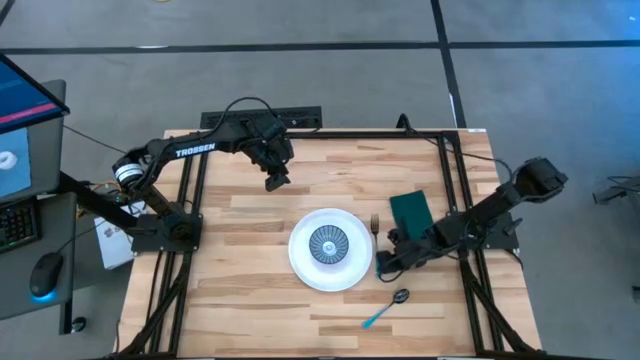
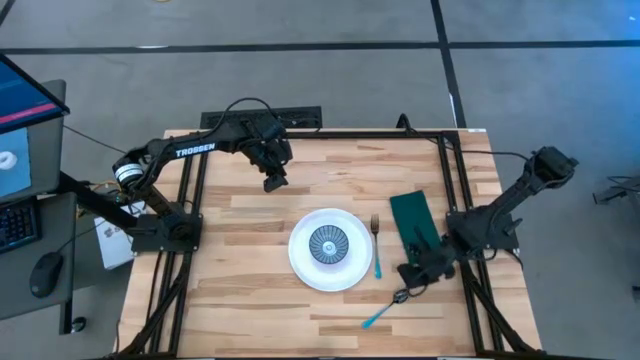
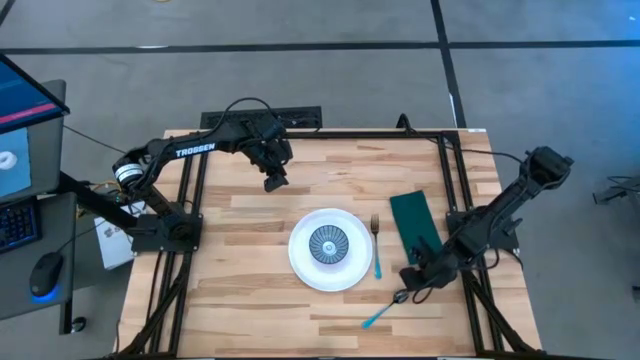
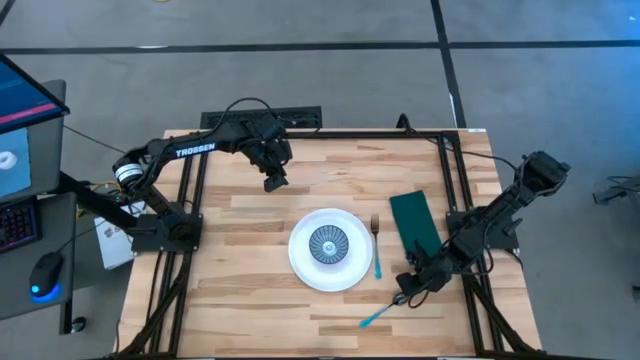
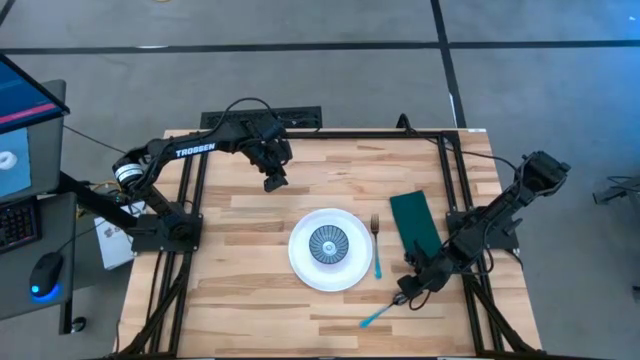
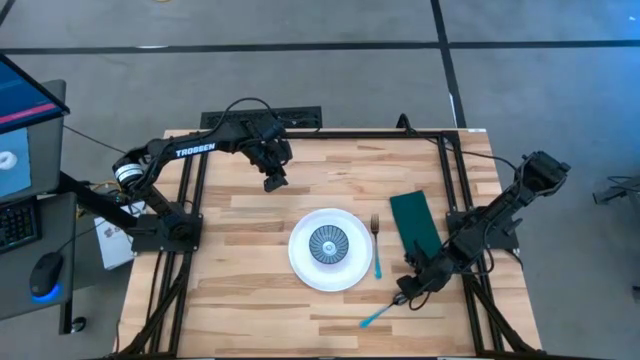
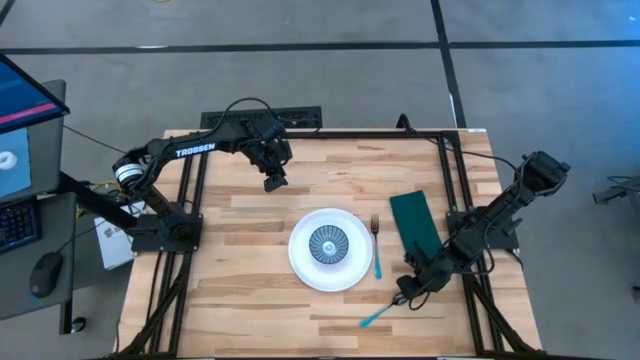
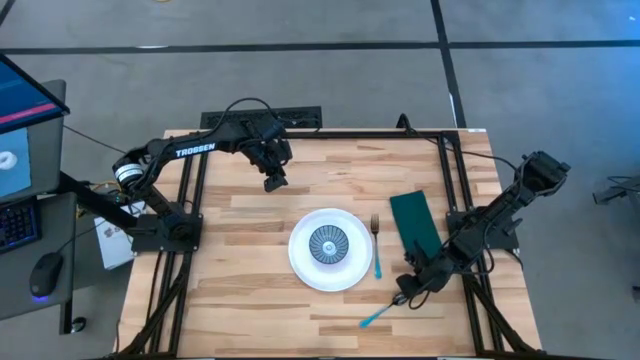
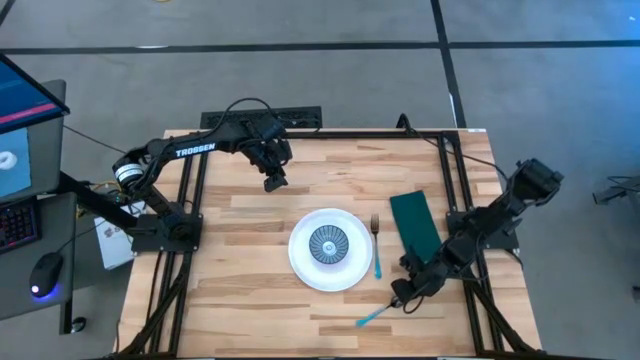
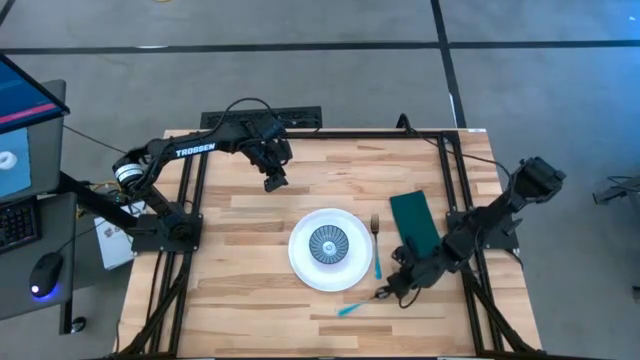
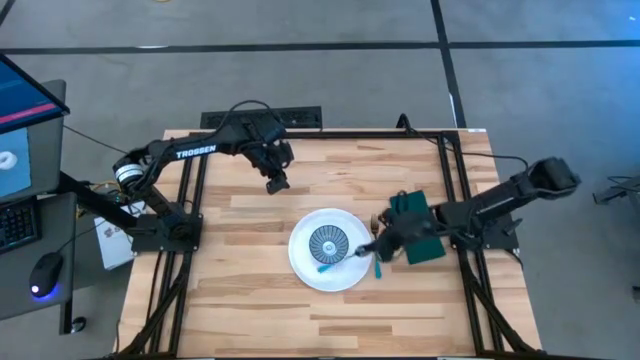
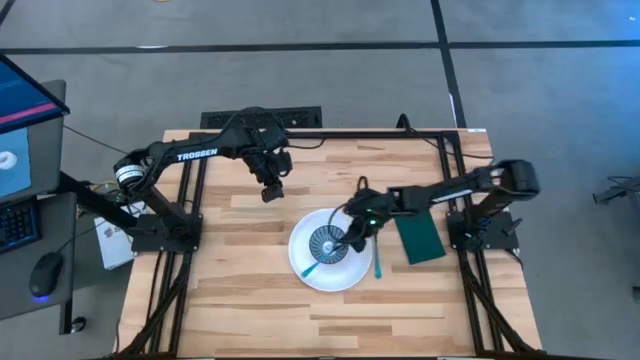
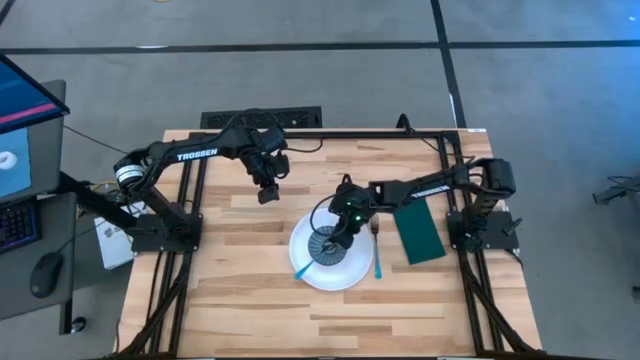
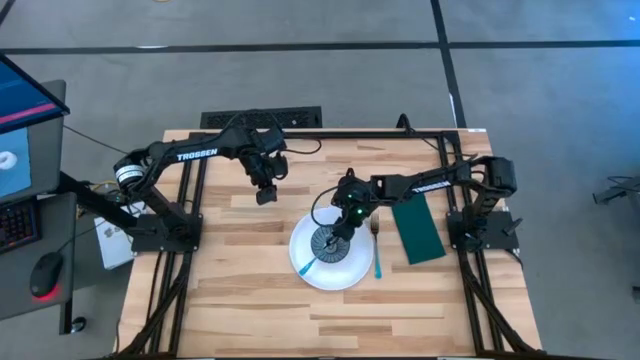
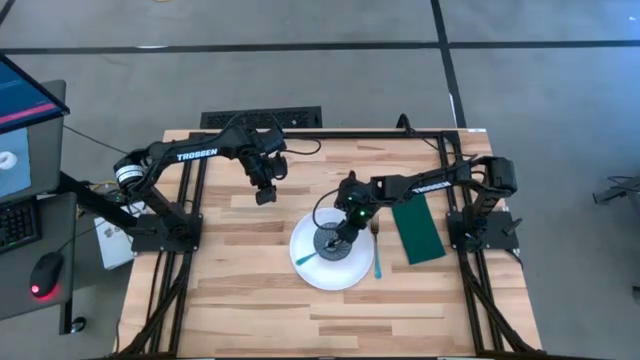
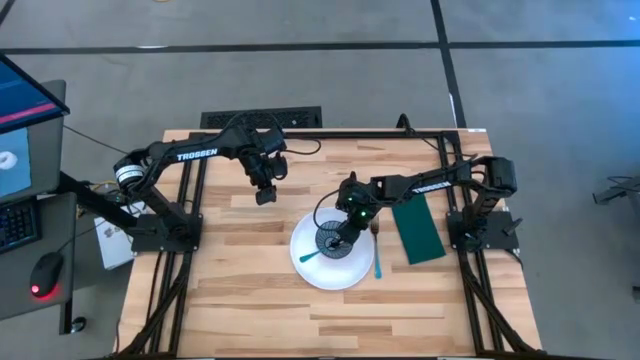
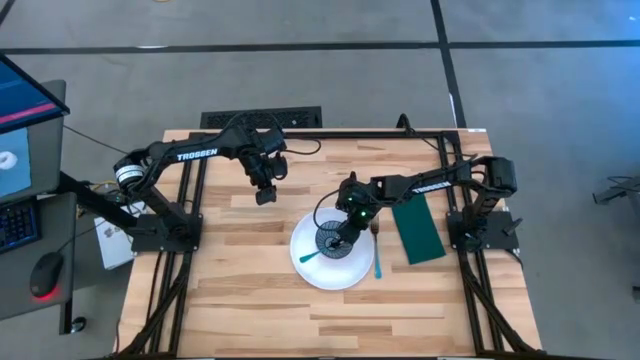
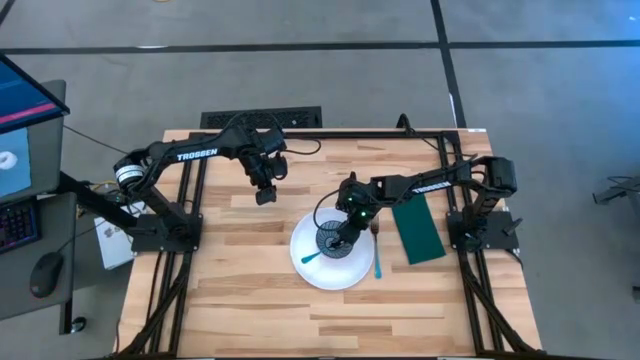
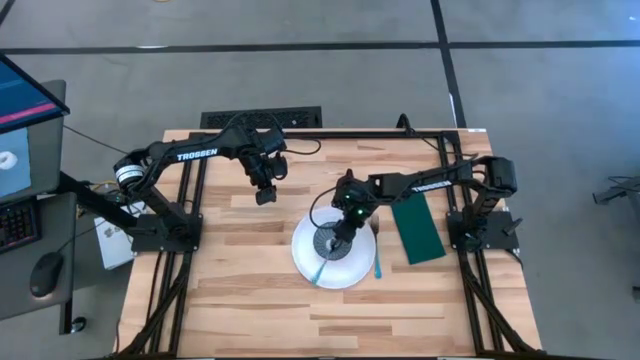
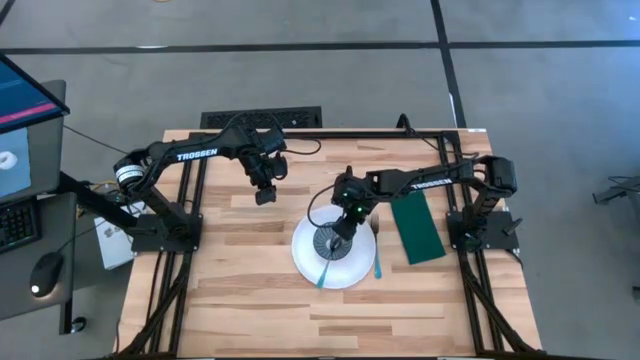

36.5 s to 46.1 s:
Task: Set table place
Put the blue spoon into the blue bowl

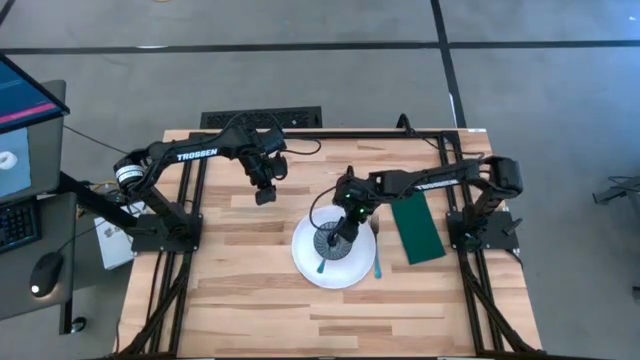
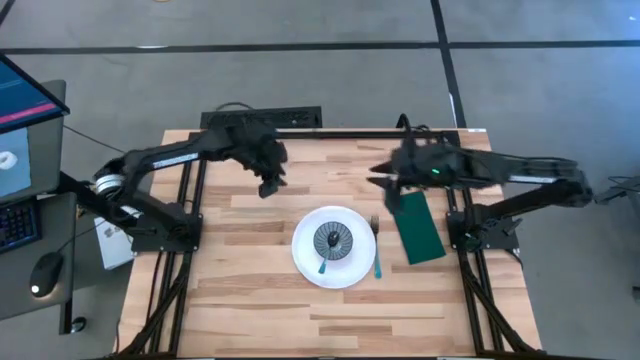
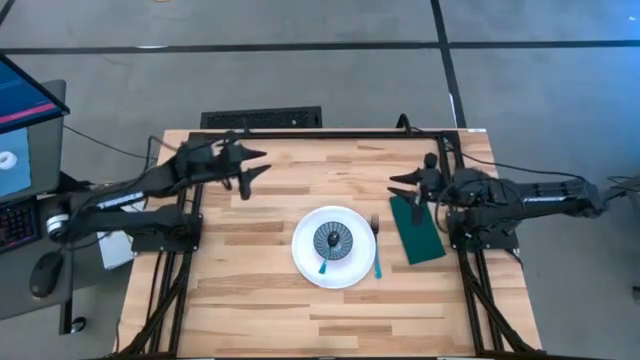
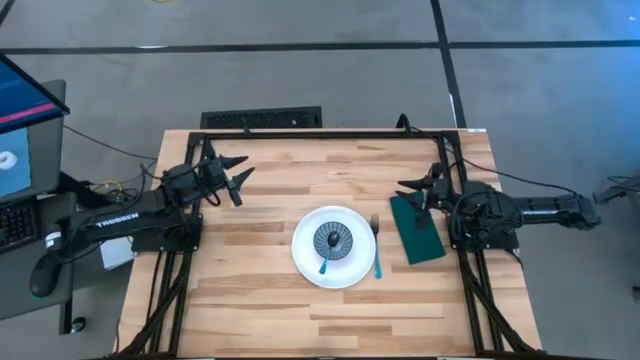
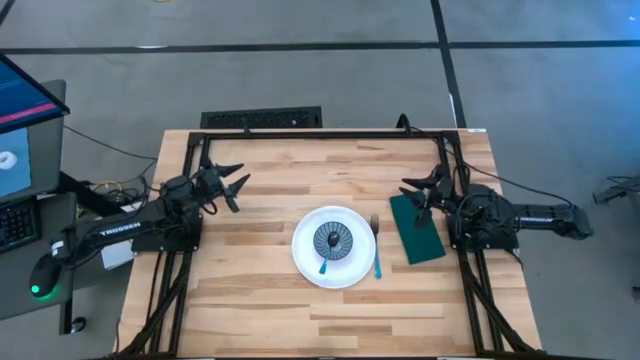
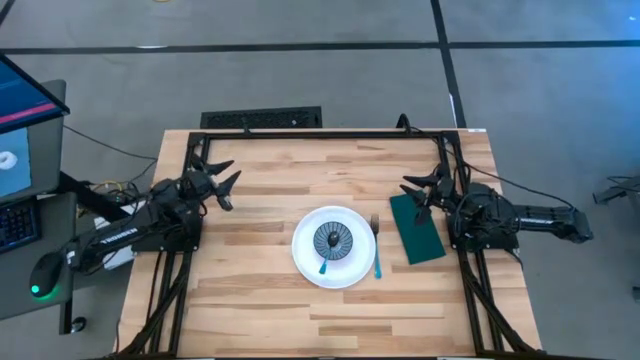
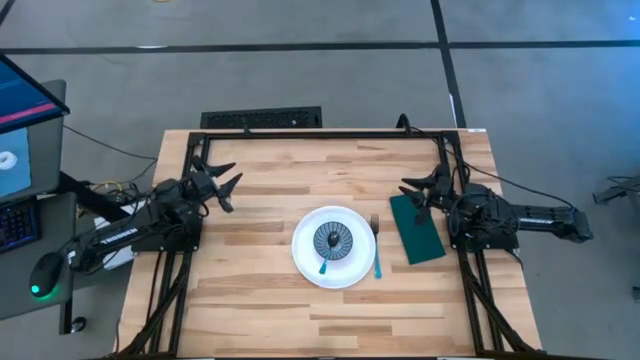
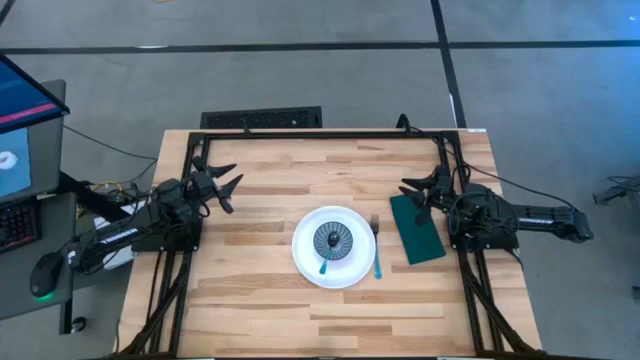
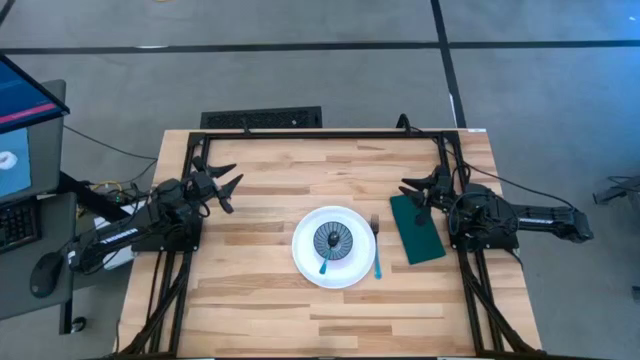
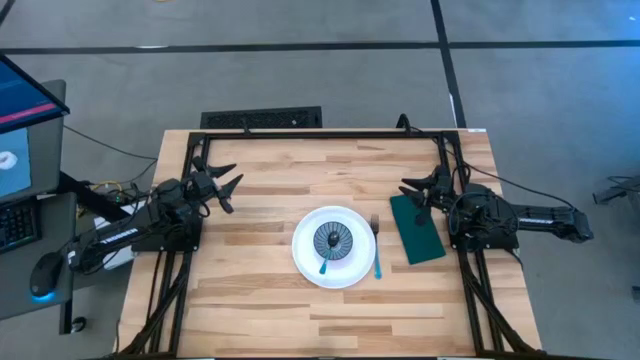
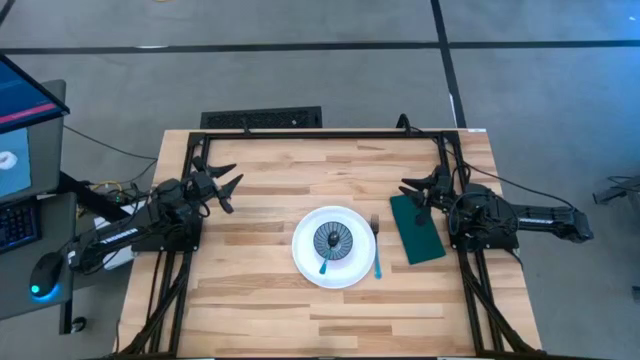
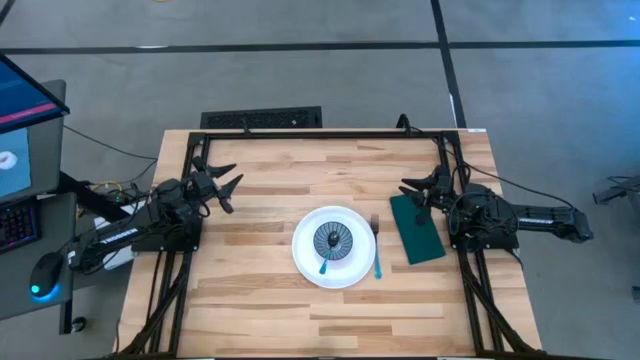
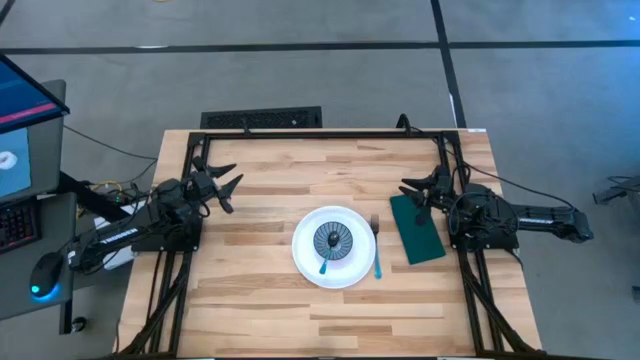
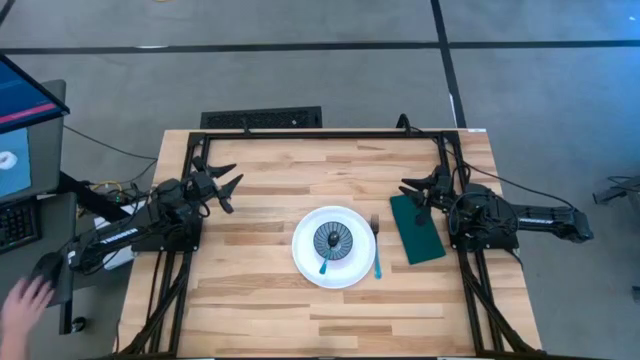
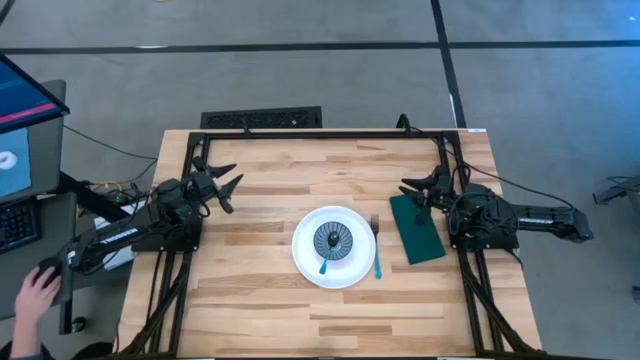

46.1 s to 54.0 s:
Return to Home Position

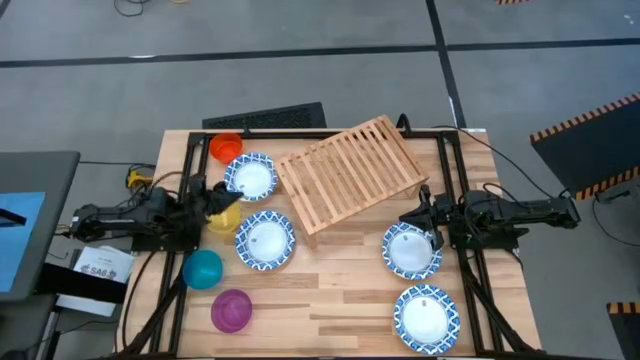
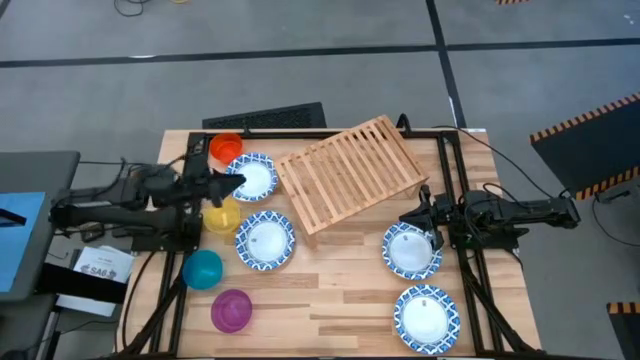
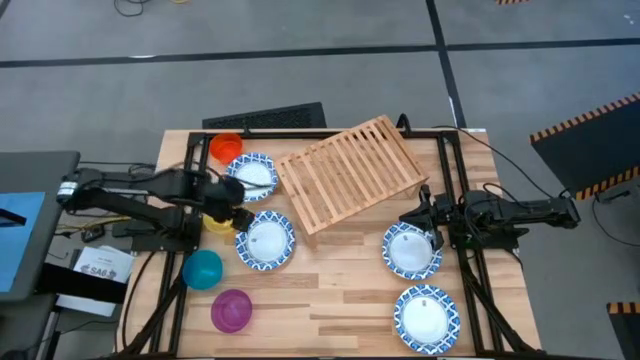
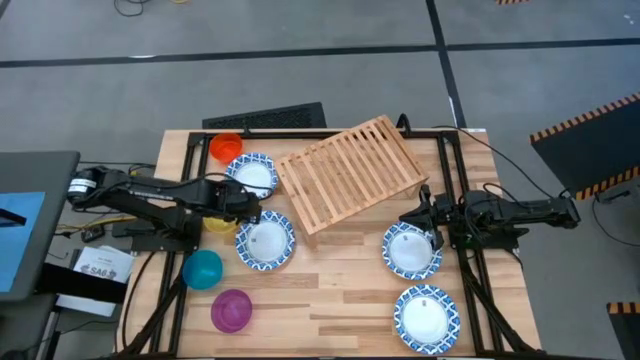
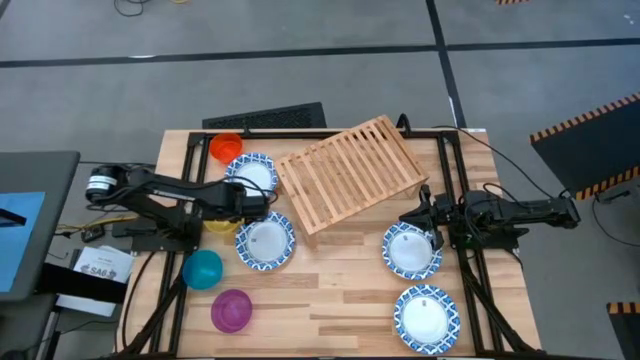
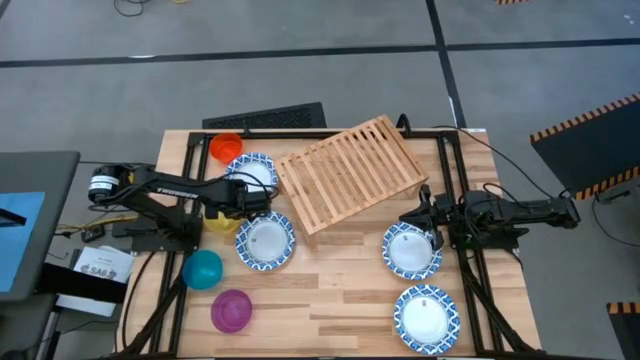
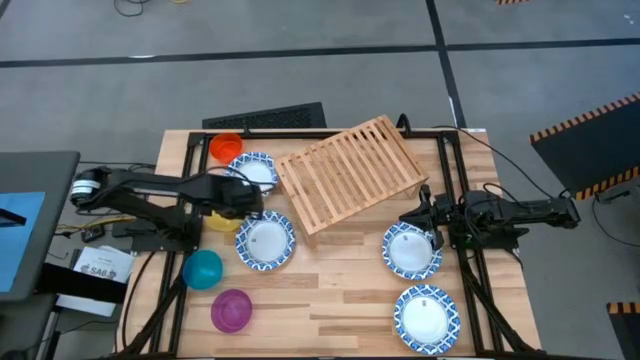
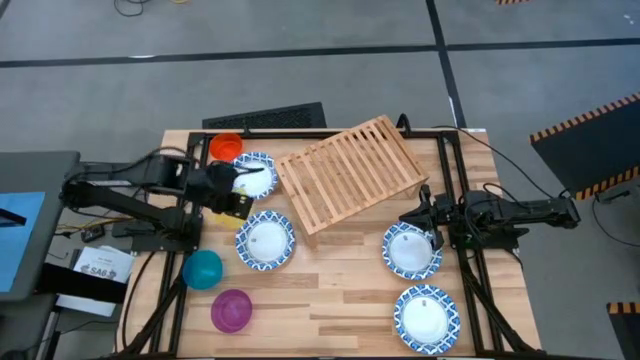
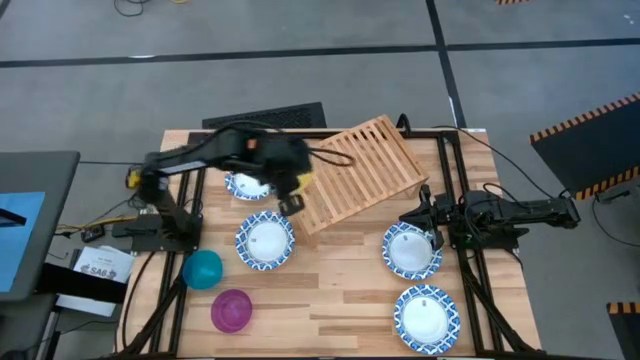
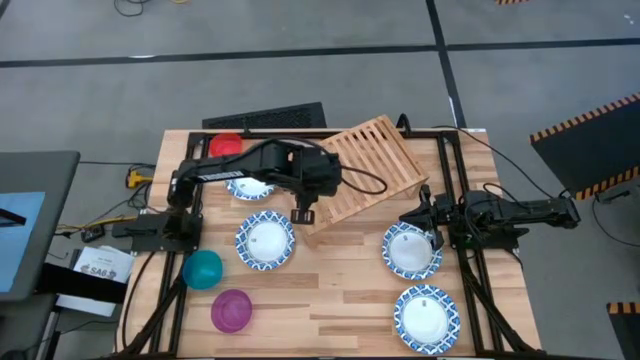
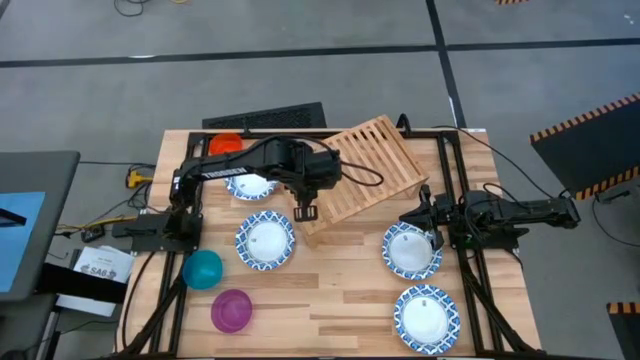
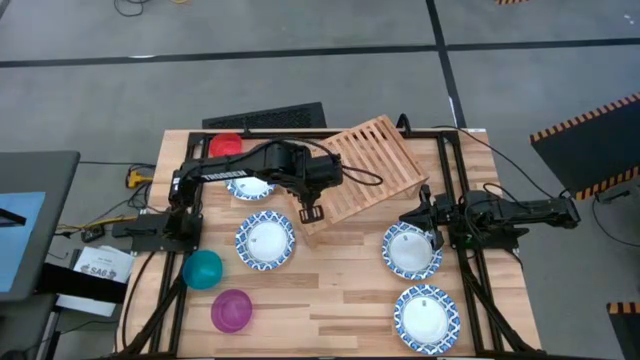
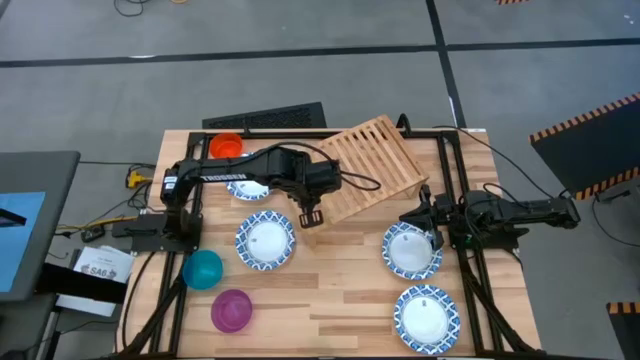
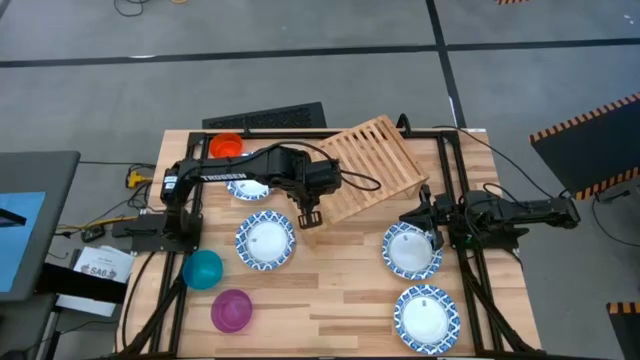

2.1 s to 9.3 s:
Task: Place and stack bowls onto a shelf
Put the yellow bowl on the shelf
